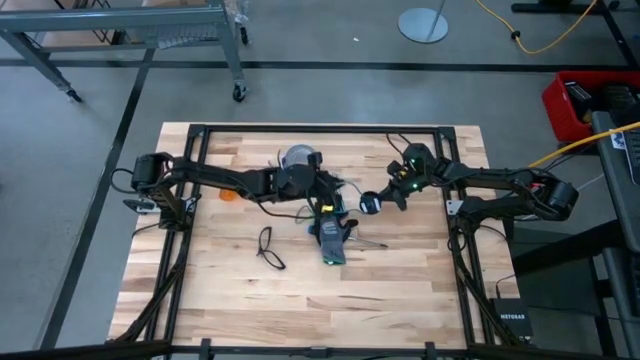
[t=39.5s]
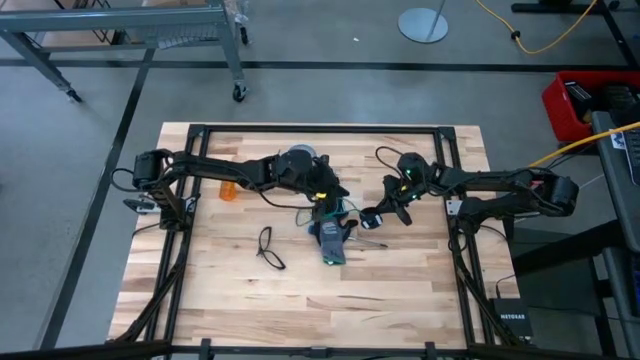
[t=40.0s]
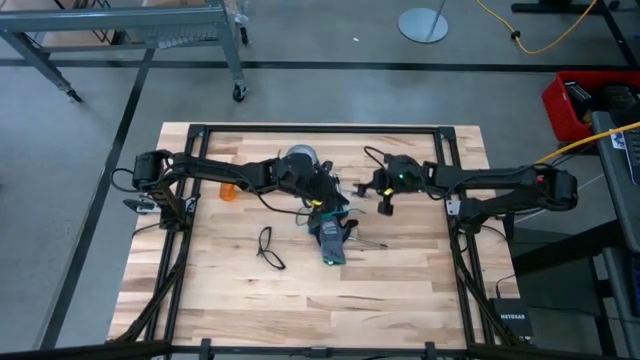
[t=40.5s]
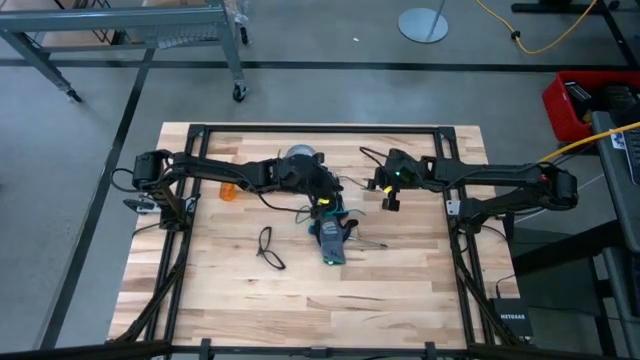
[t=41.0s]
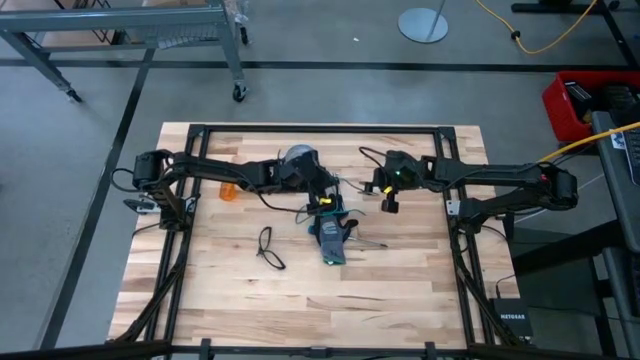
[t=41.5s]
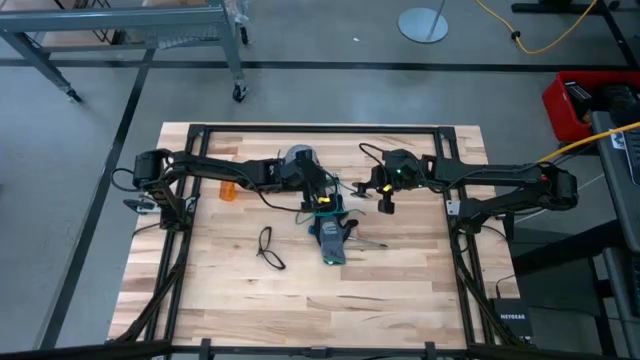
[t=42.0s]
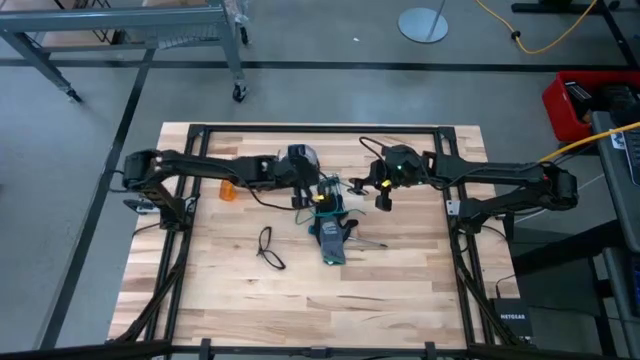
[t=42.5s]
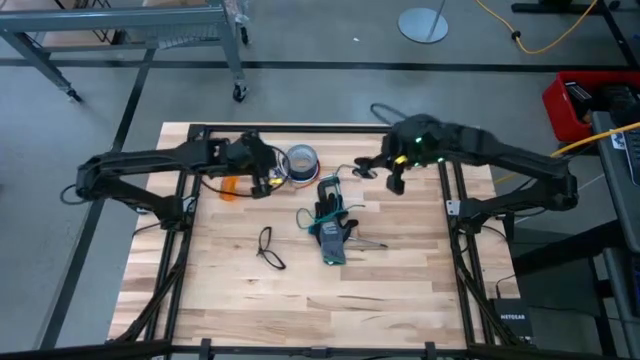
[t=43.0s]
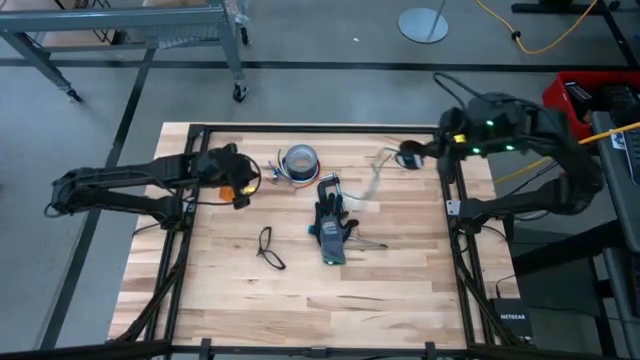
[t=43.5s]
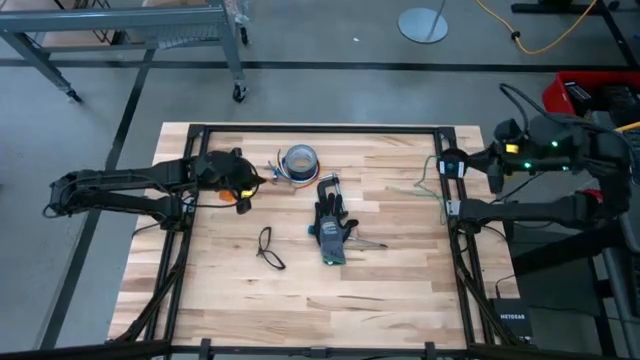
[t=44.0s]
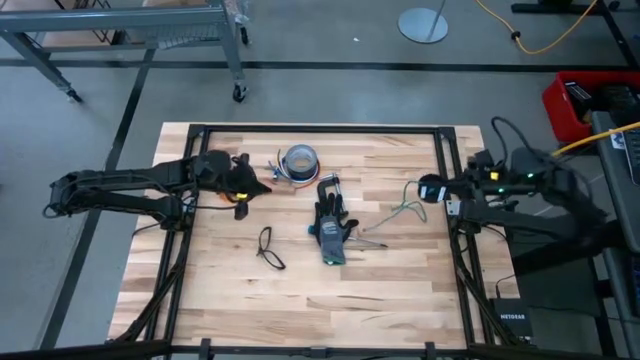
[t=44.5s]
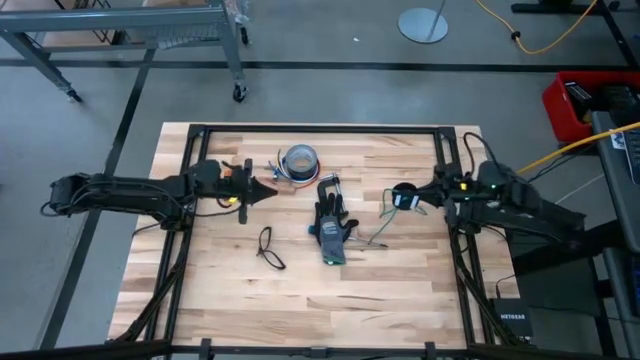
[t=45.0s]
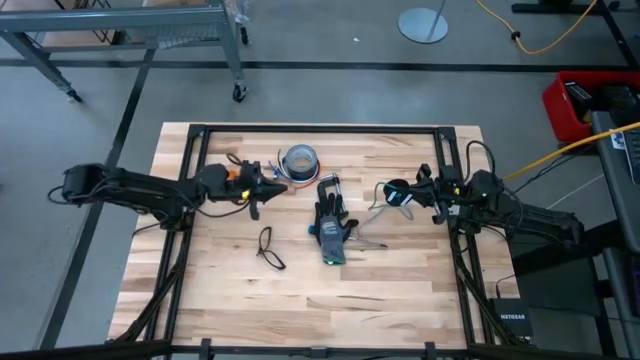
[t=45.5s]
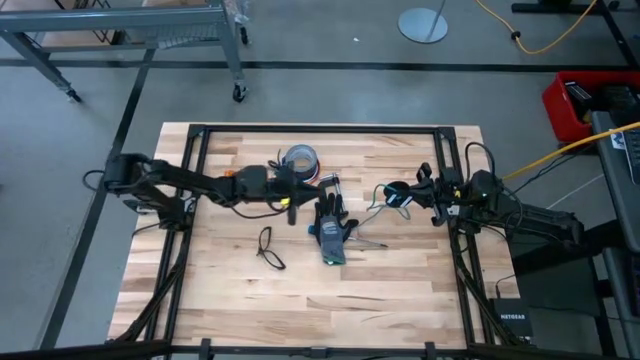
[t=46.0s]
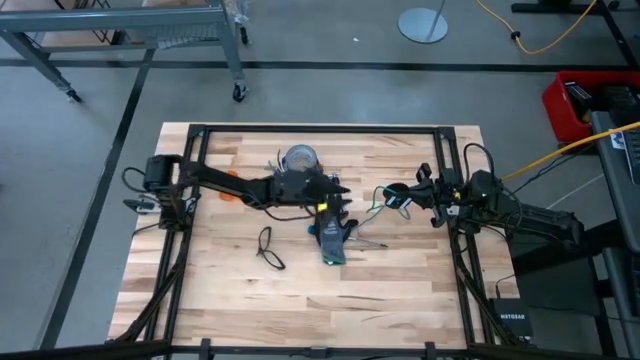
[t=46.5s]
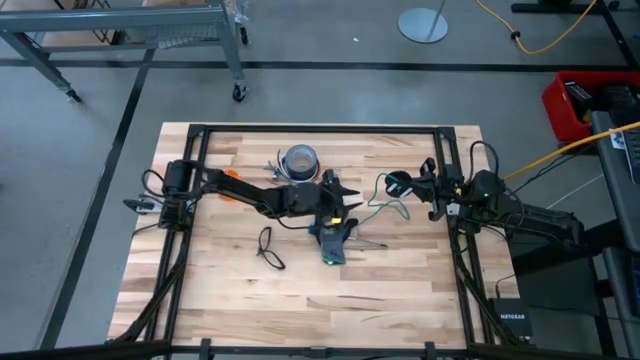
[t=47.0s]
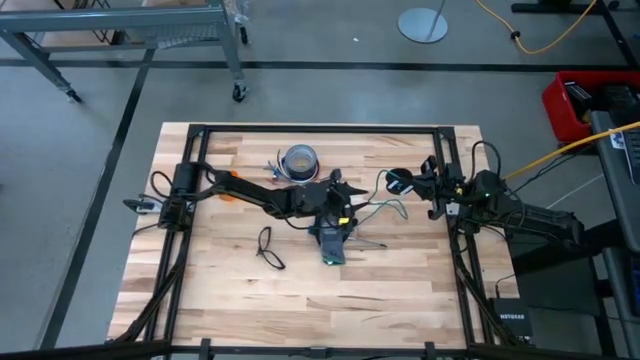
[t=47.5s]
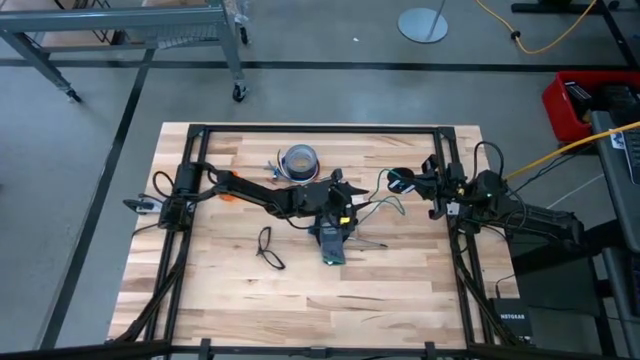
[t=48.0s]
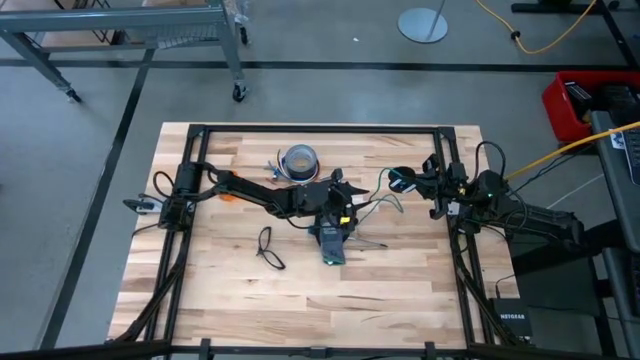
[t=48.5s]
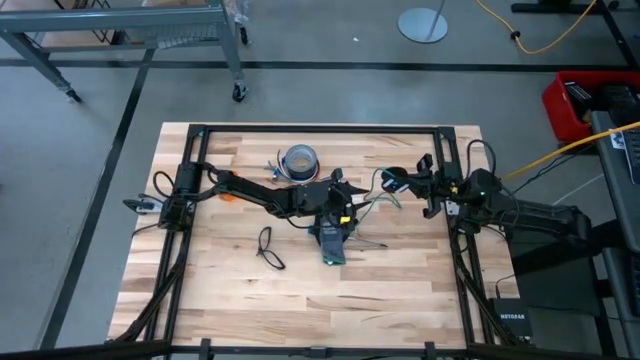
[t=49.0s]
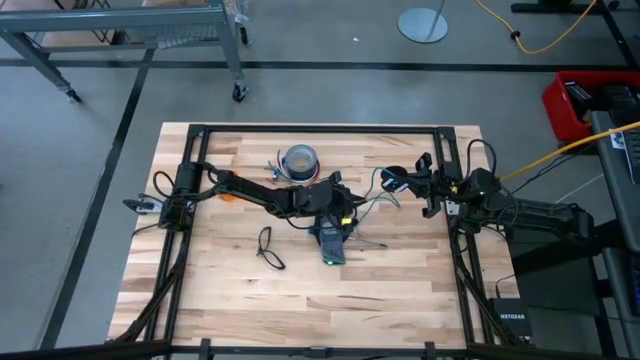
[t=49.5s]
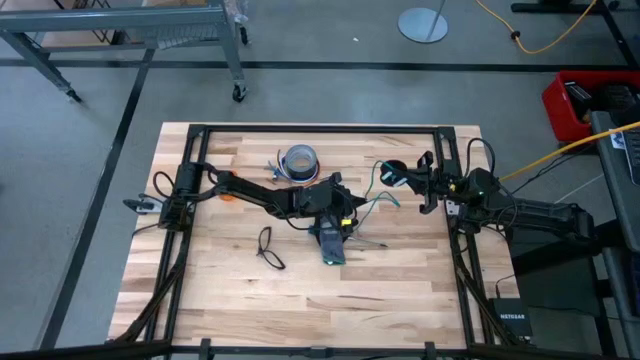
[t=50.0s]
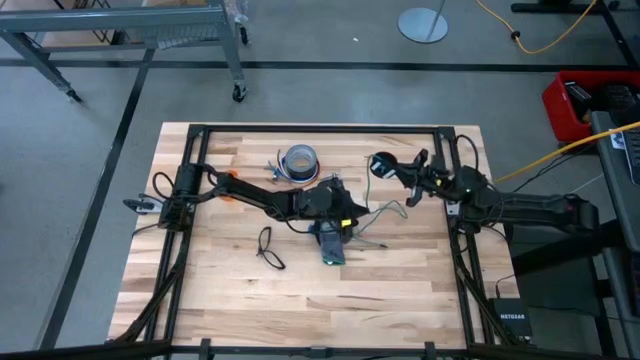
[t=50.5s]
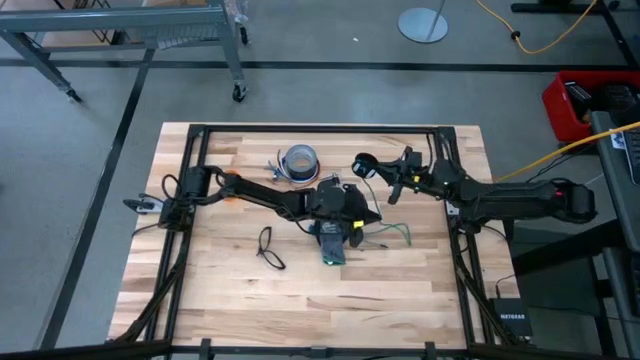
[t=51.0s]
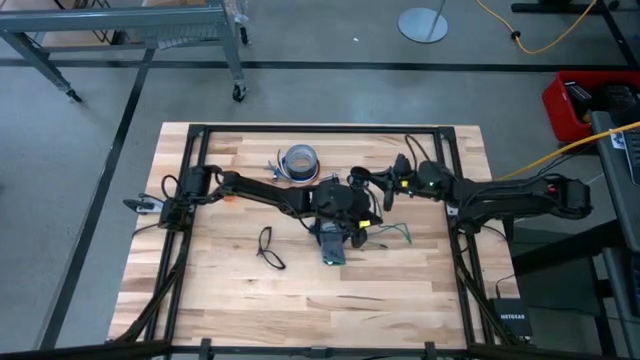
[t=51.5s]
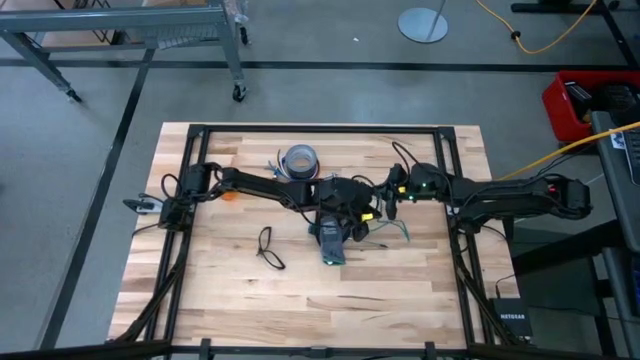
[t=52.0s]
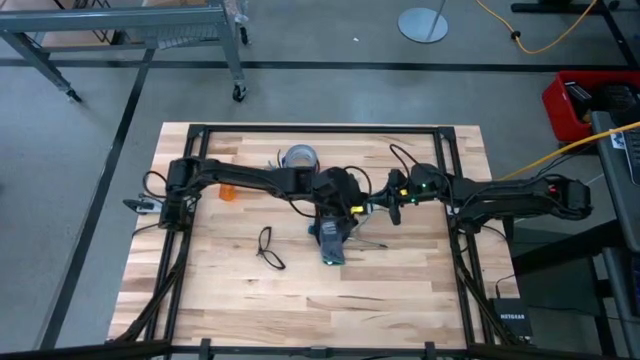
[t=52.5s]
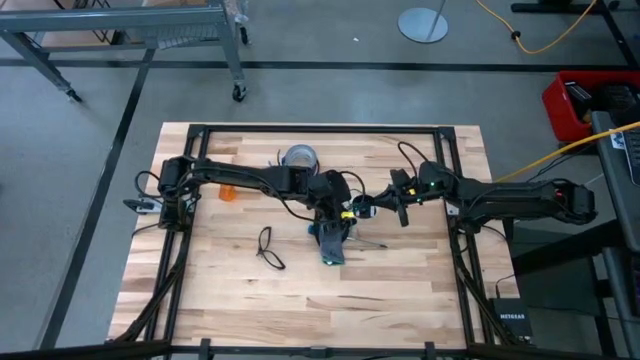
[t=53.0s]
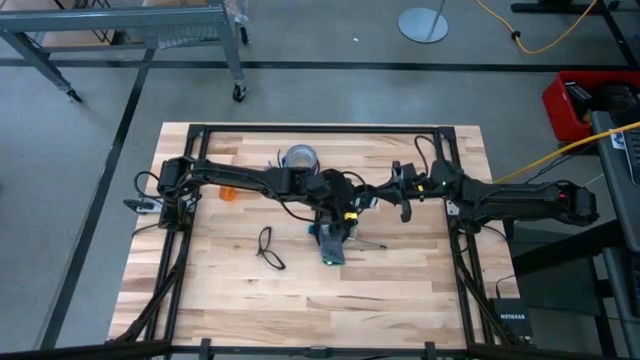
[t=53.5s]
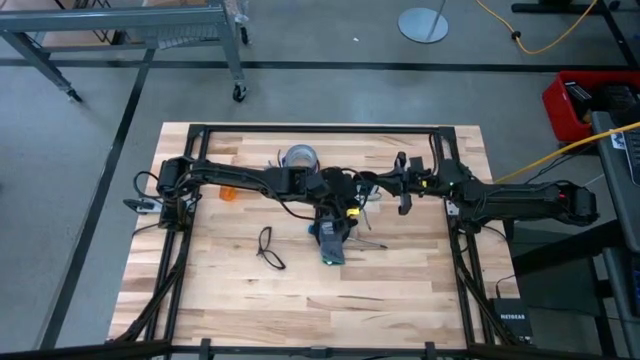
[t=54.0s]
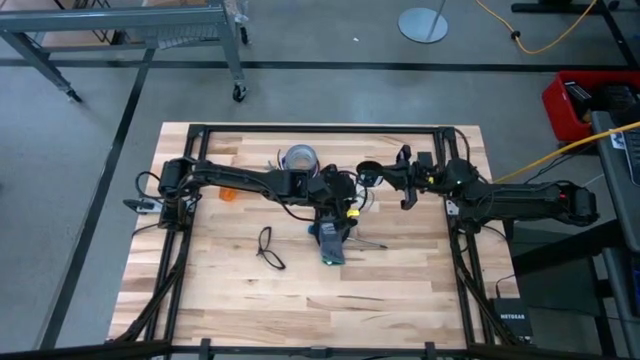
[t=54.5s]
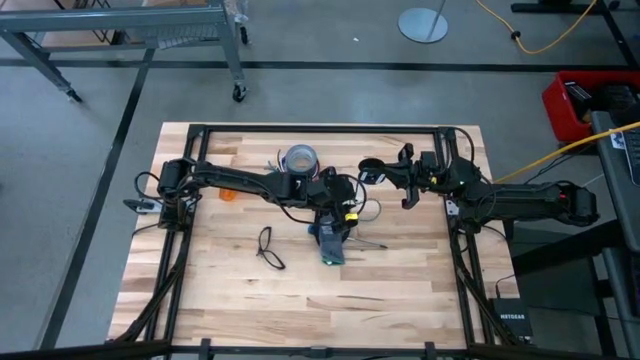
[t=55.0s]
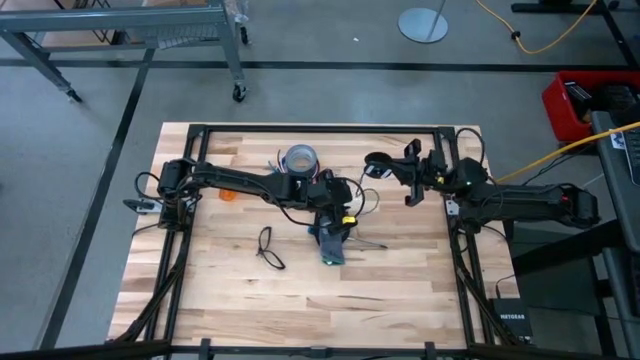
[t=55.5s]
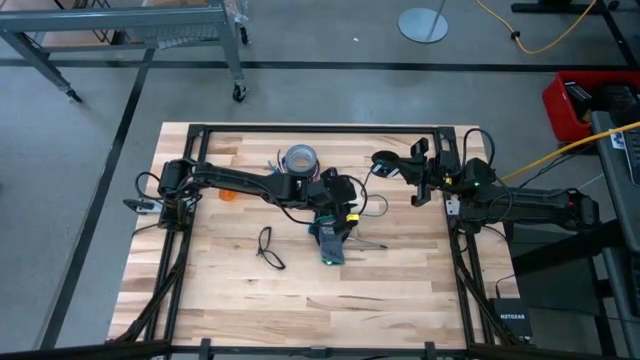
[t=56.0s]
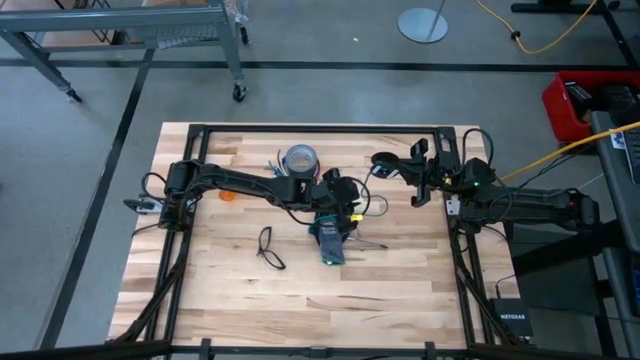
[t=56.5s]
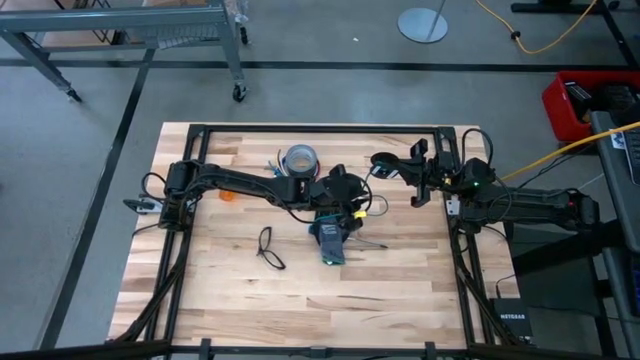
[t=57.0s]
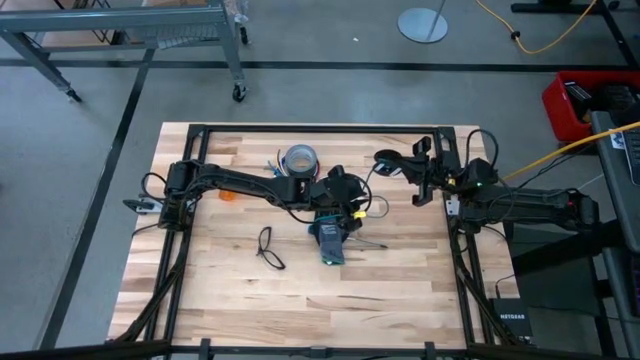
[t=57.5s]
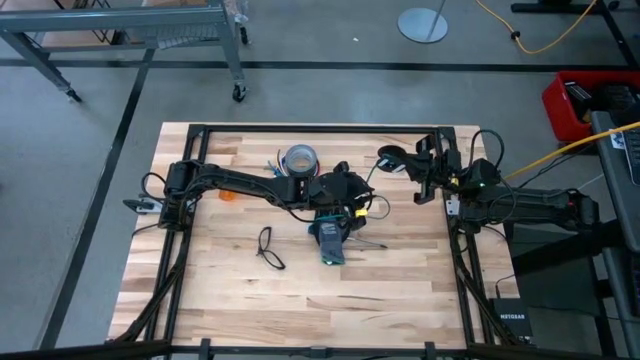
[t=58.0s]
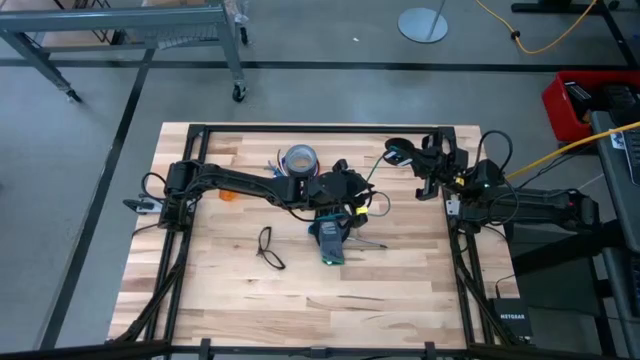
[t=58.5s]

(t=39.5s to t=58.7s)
Task: Coil cords
Coil the green wire on the black spool
